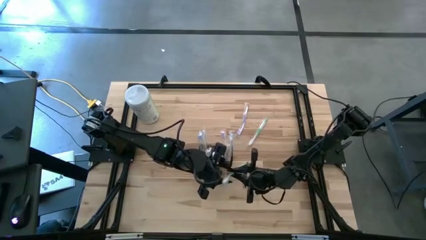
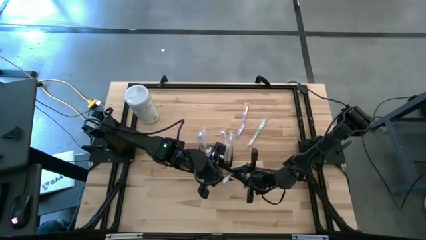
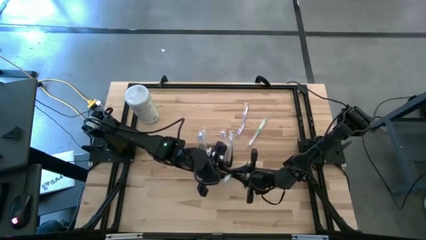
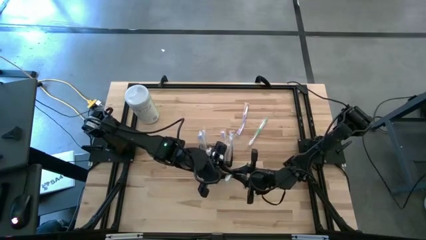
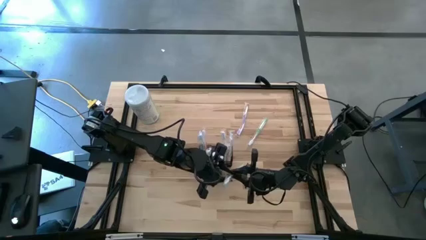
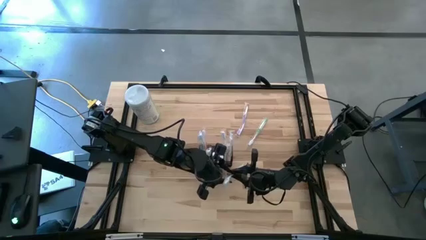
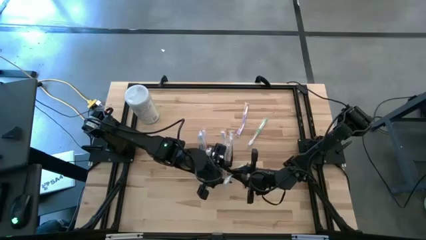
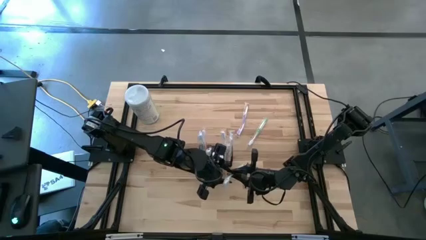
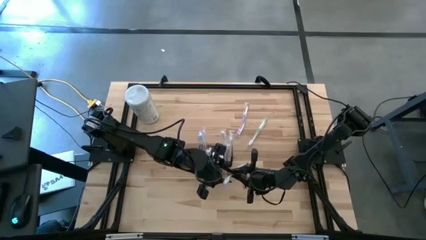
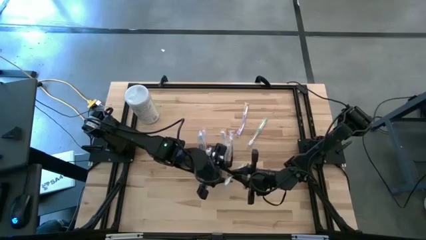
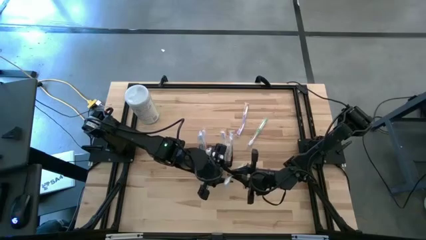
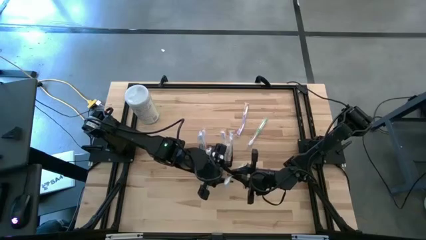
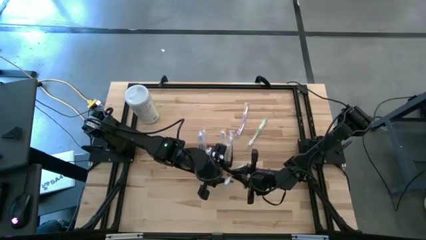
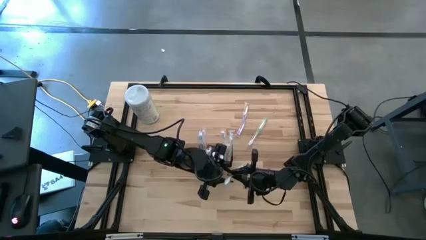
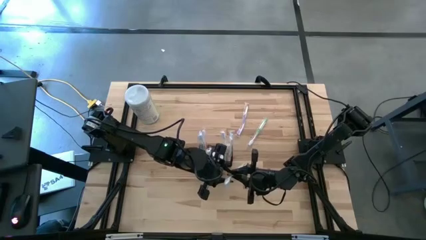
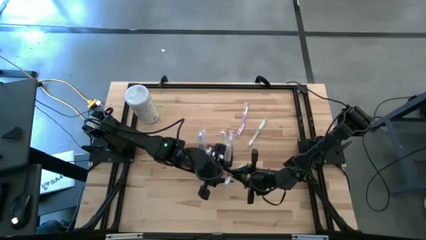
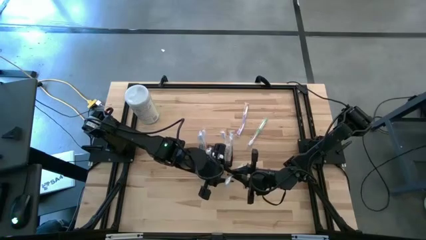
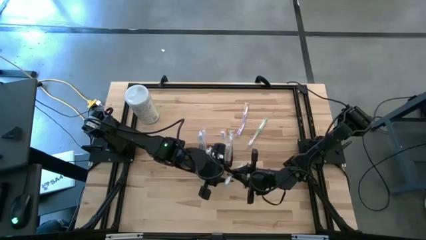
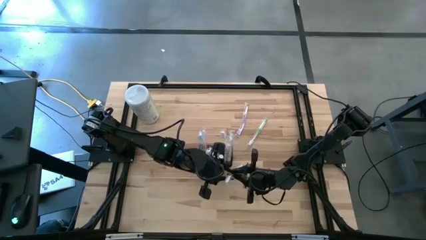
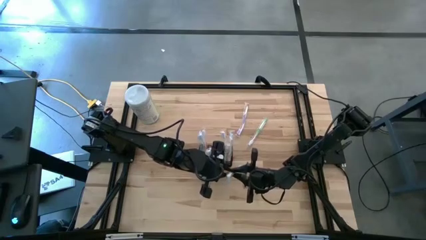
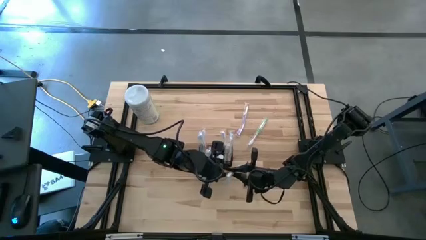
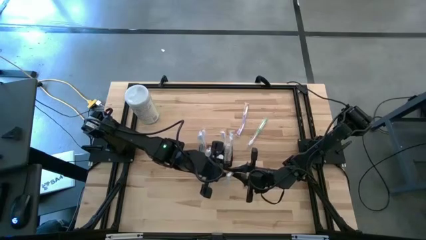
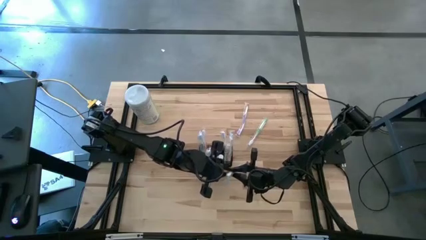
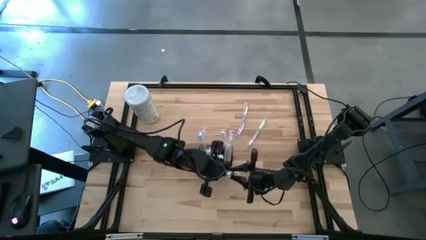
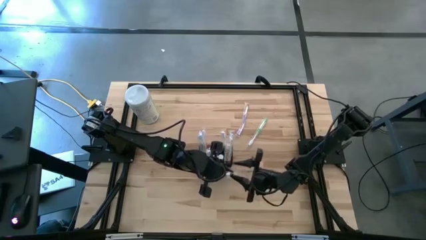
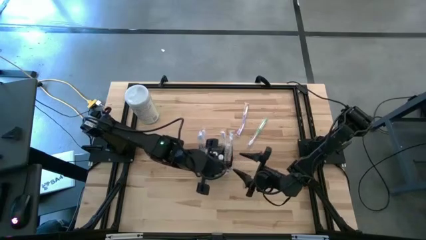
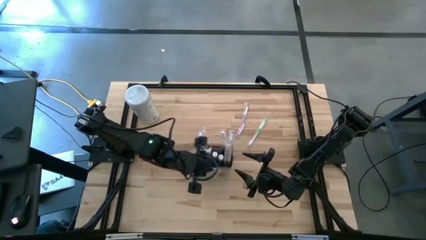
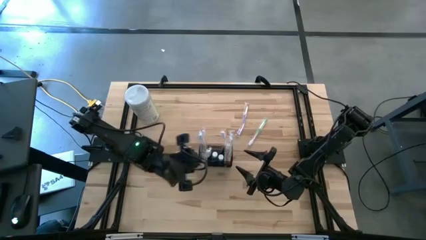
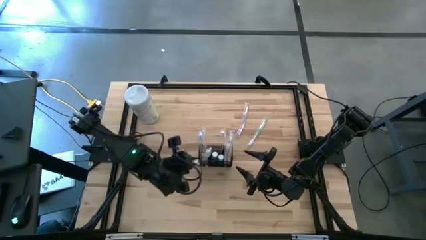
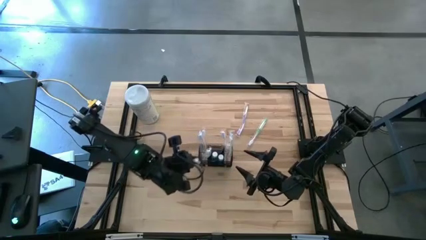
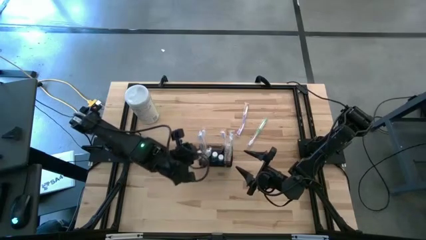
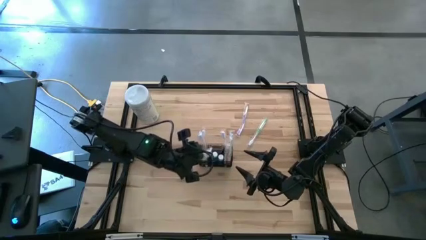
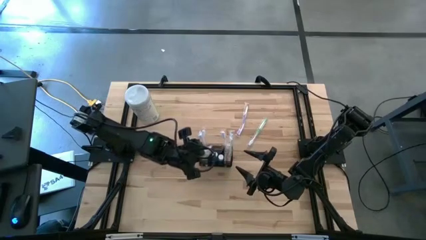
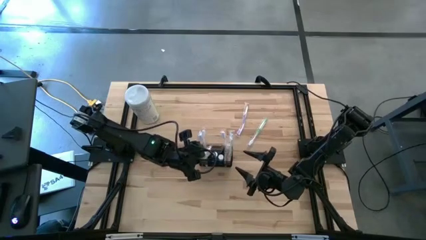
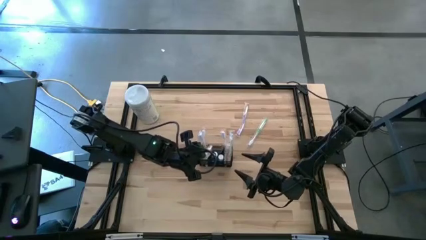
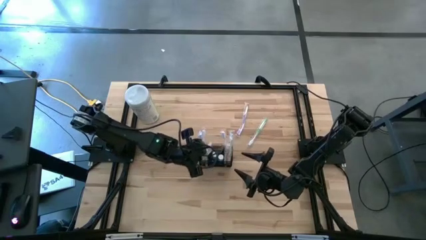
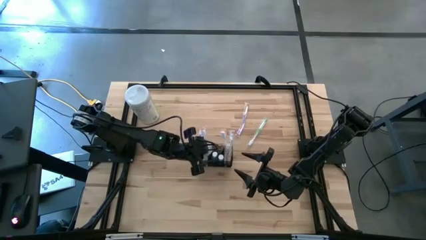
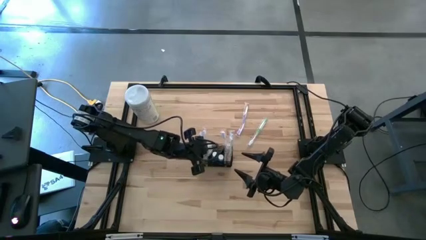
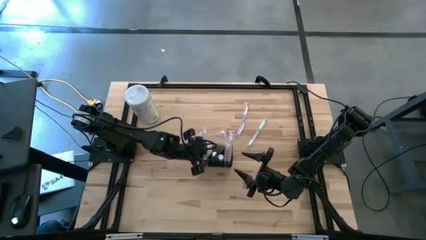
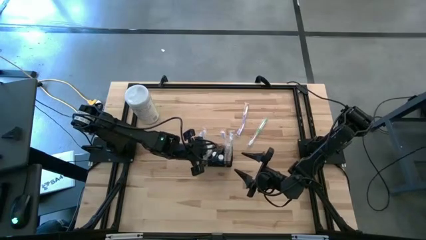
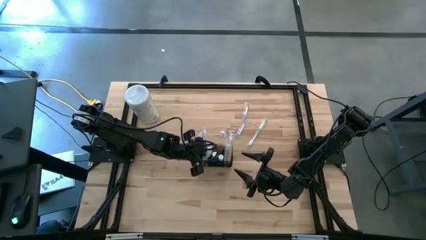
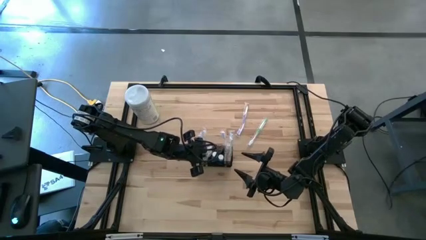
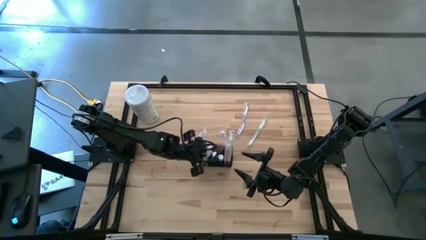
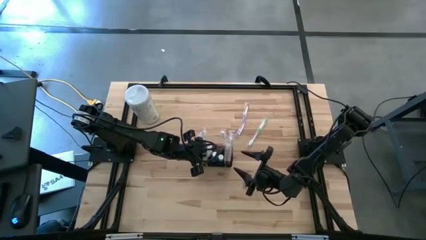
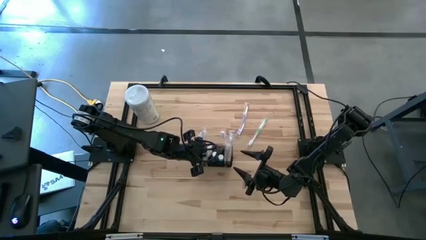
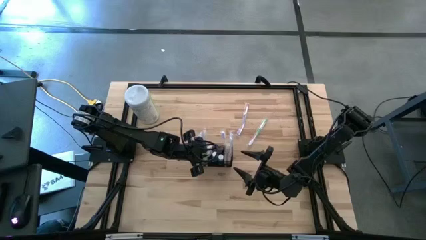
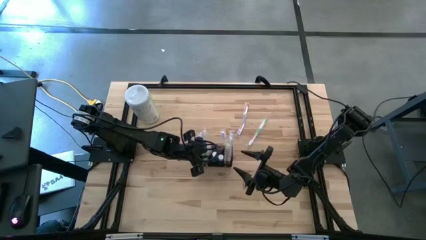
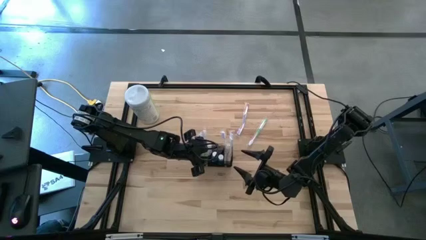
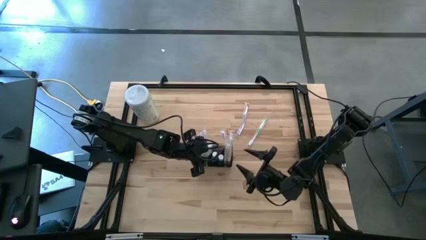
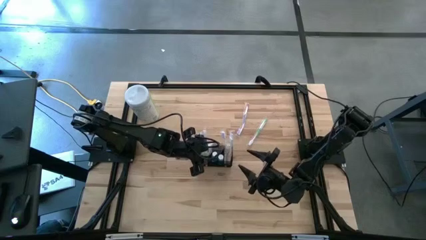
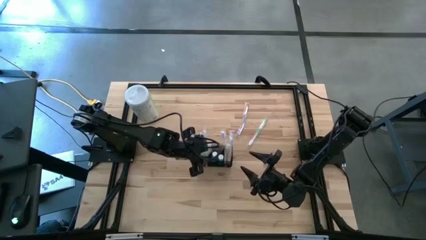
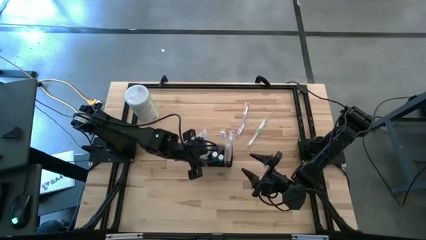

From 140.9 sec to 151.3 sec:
Task: Pick & Place toothbrushing station
Put the bottom green toothbrush into the black mesh

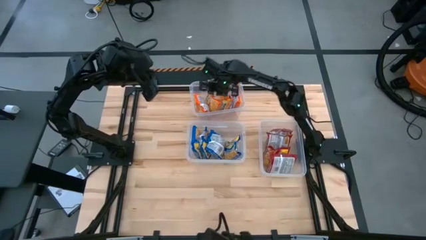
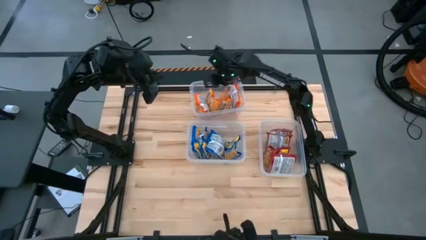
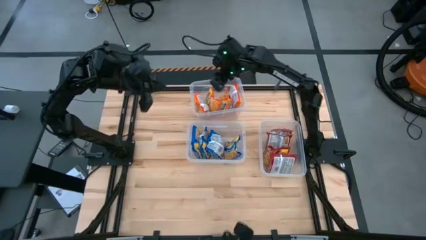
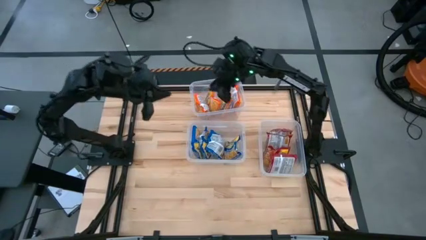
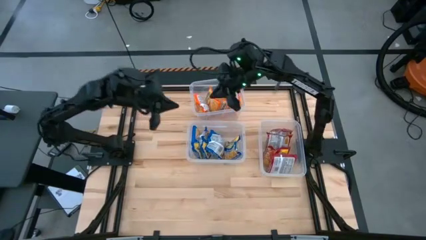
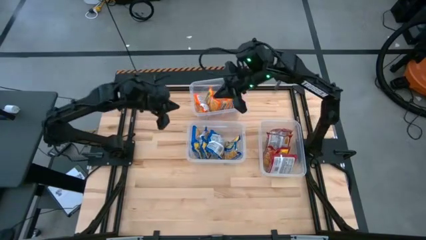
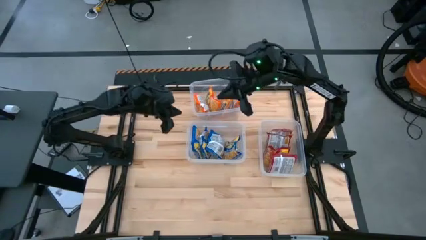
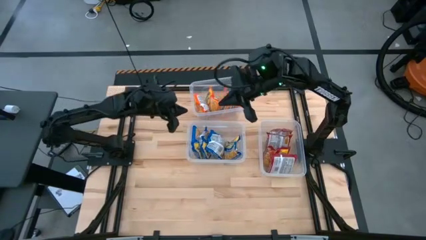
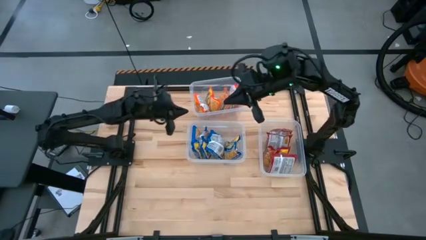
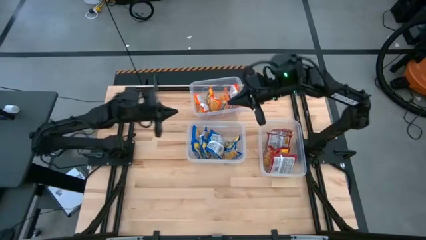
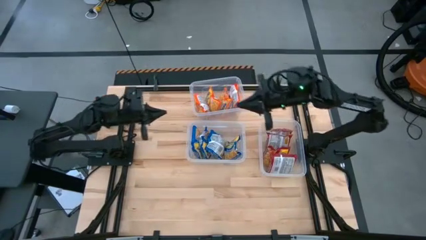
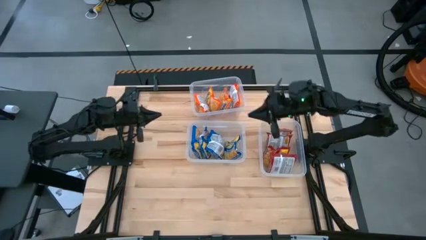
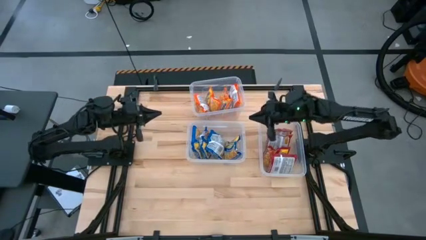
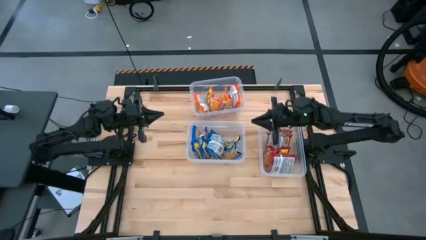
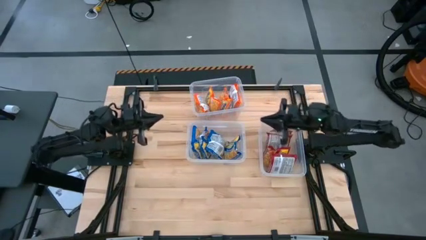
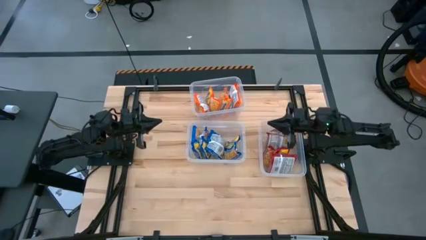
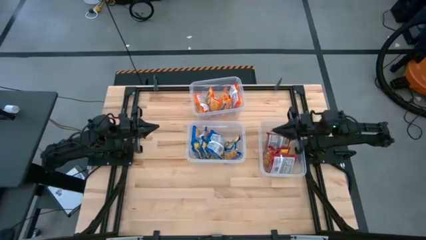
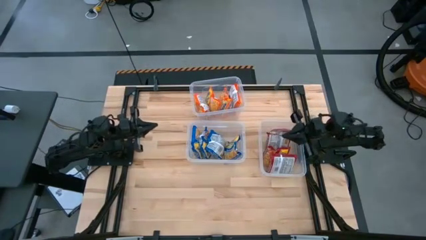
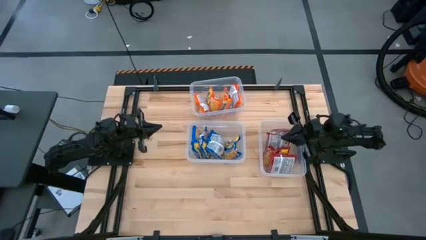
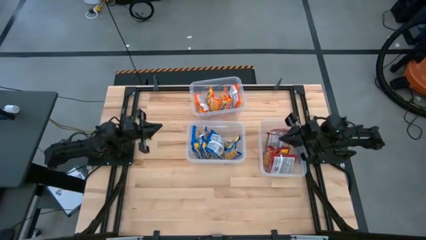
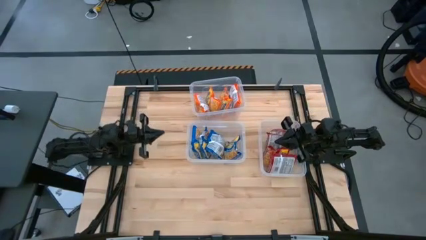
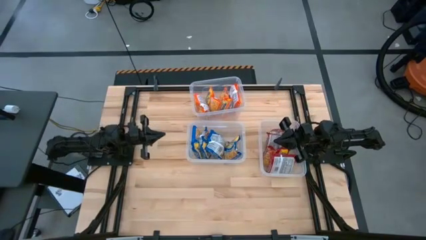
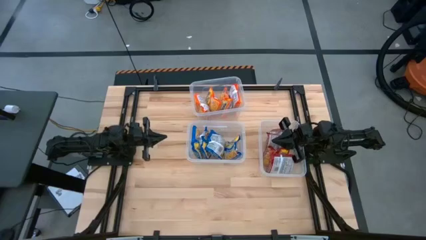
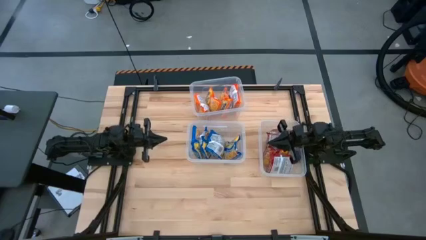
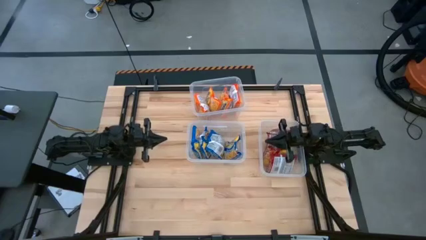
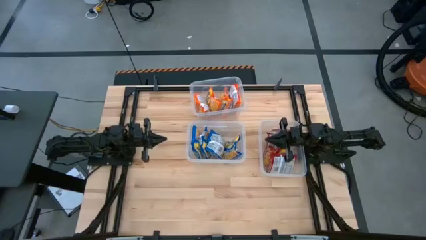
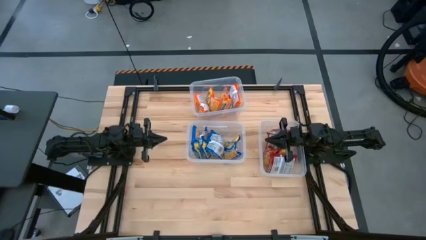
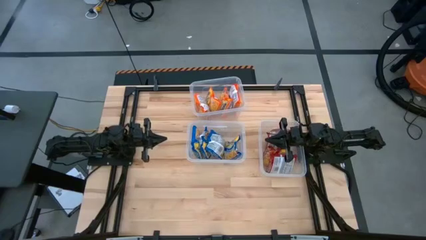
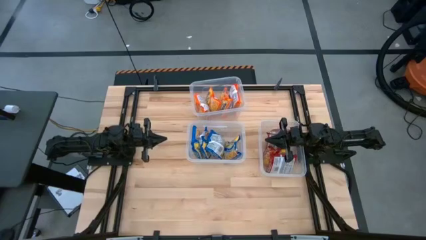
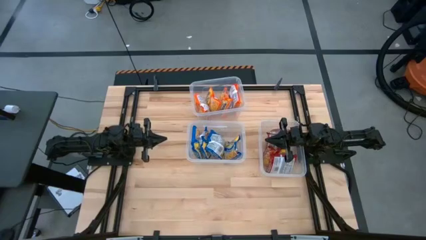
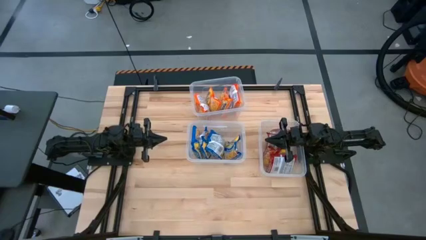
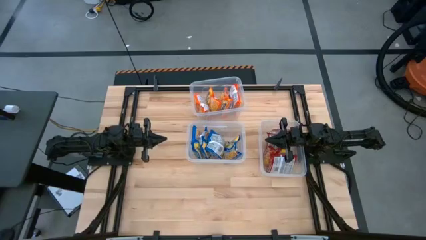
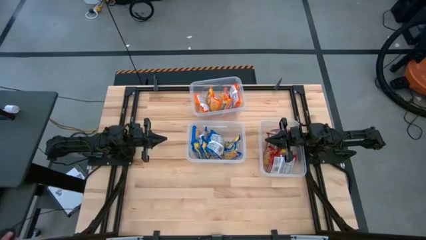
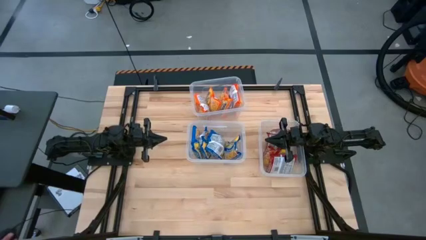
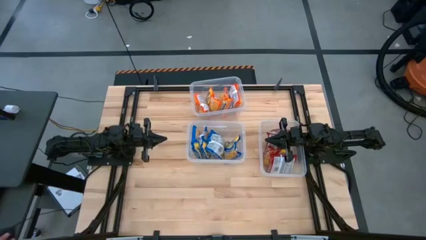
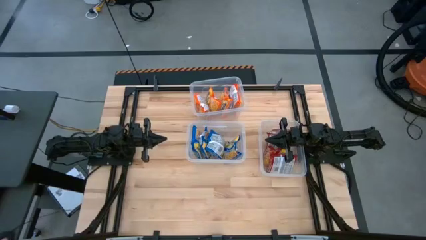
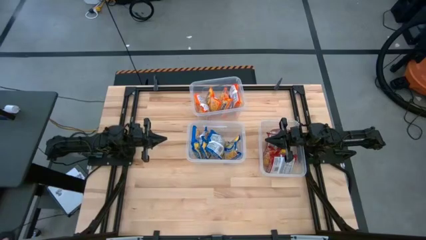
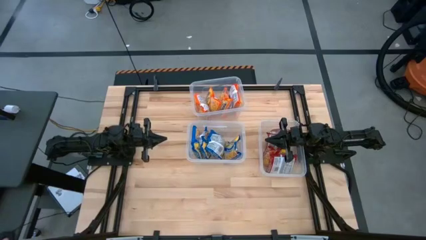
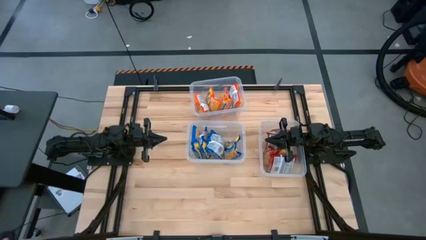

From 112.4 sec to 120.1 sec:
Task: Sort Maruchan noodles
Return to Home Position
